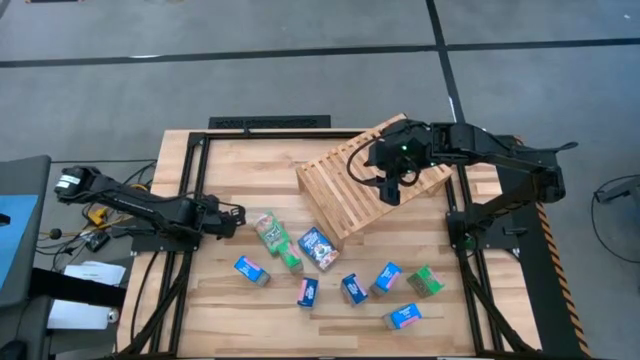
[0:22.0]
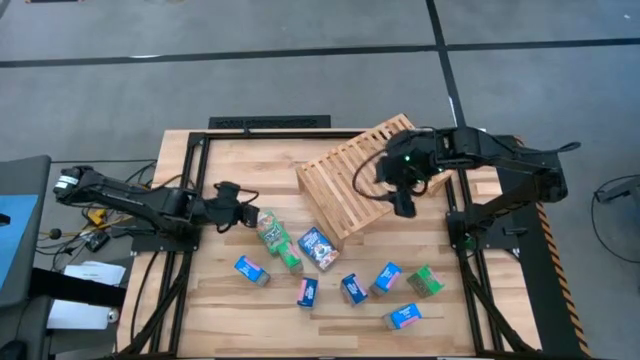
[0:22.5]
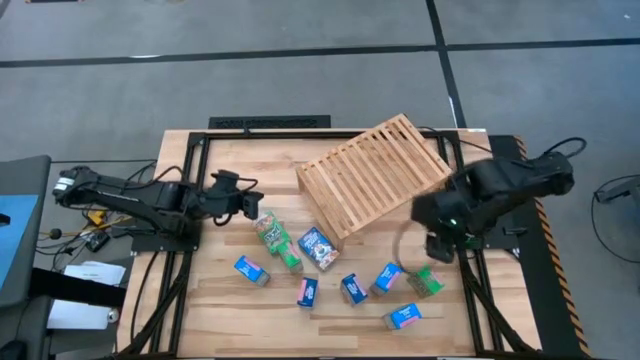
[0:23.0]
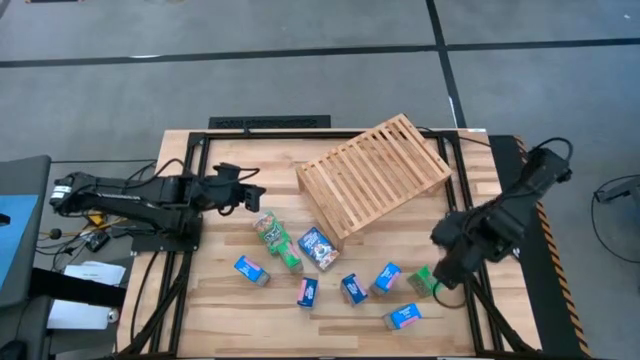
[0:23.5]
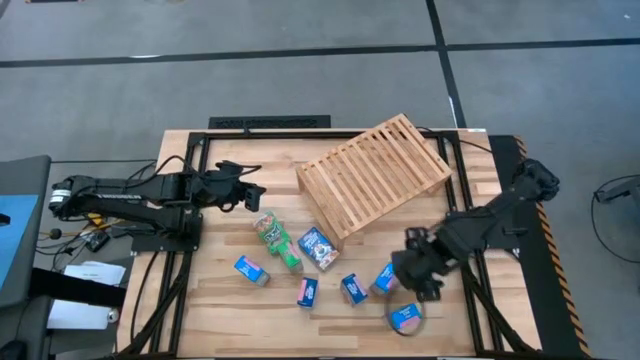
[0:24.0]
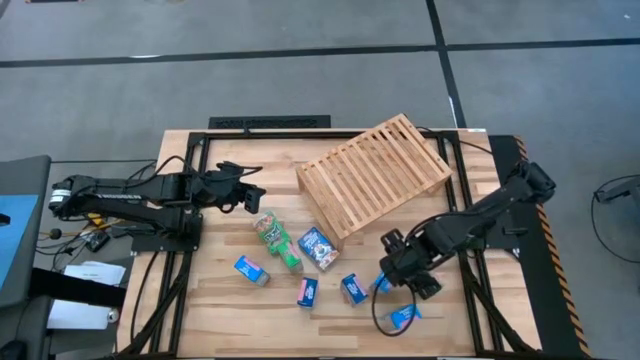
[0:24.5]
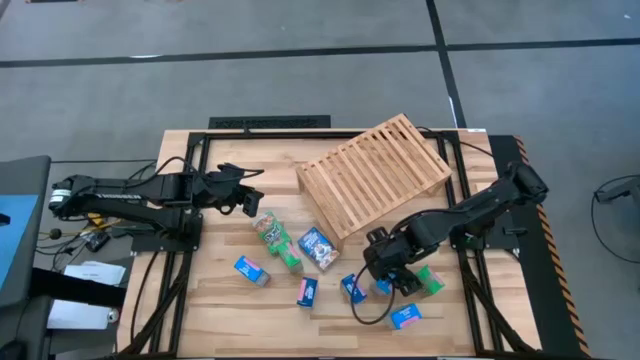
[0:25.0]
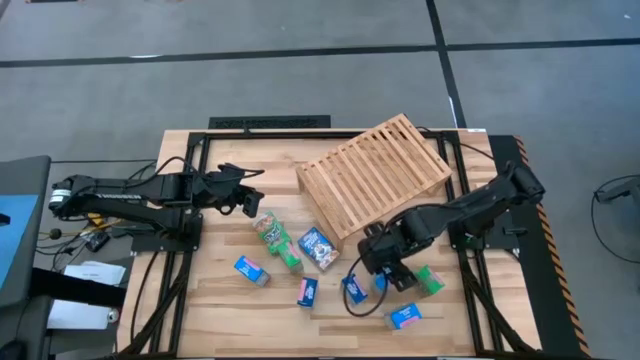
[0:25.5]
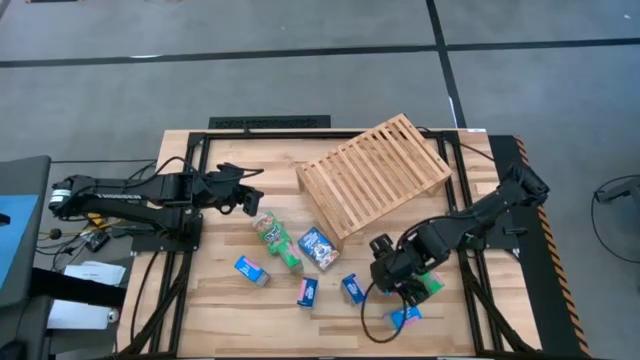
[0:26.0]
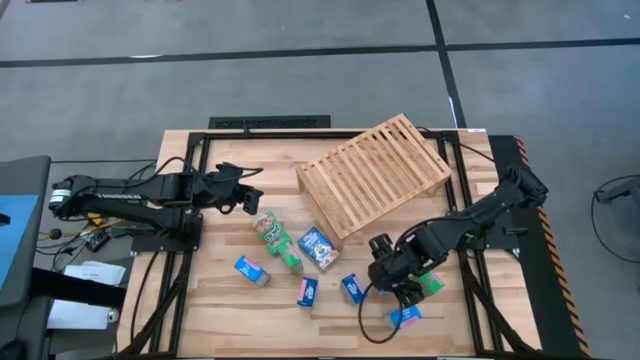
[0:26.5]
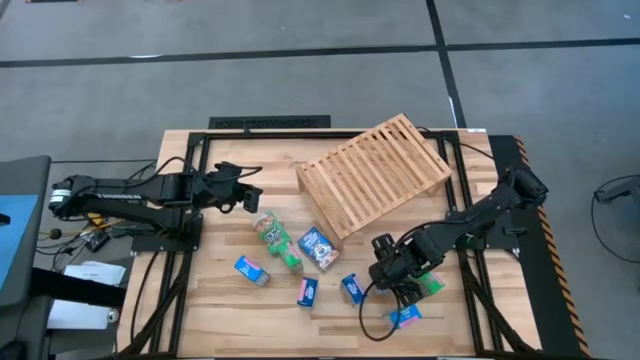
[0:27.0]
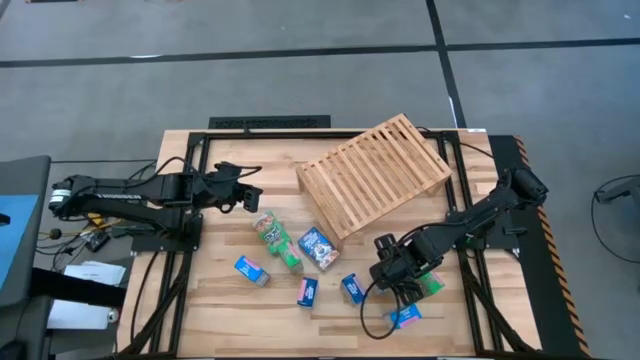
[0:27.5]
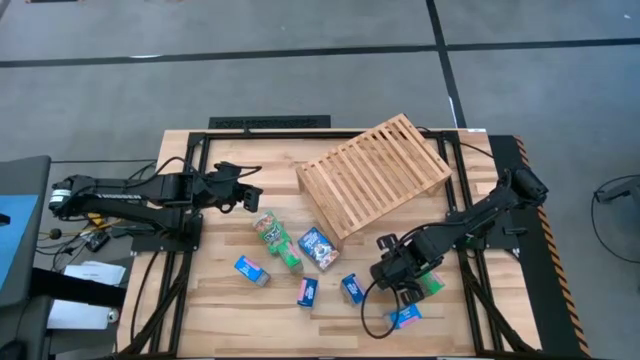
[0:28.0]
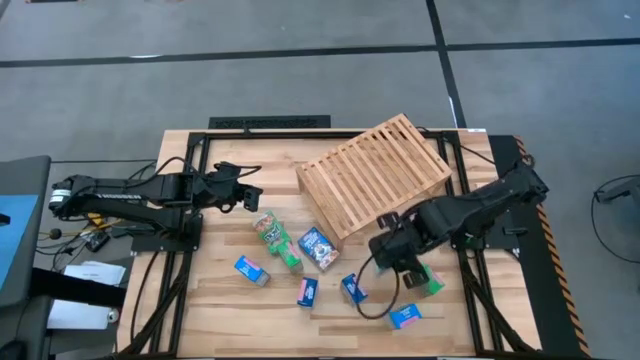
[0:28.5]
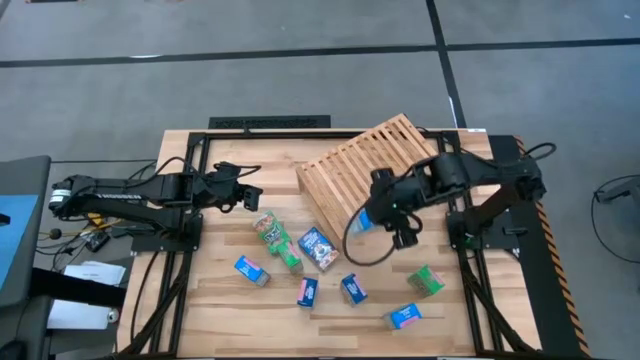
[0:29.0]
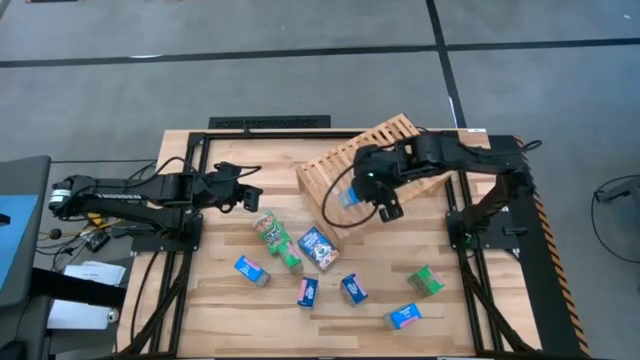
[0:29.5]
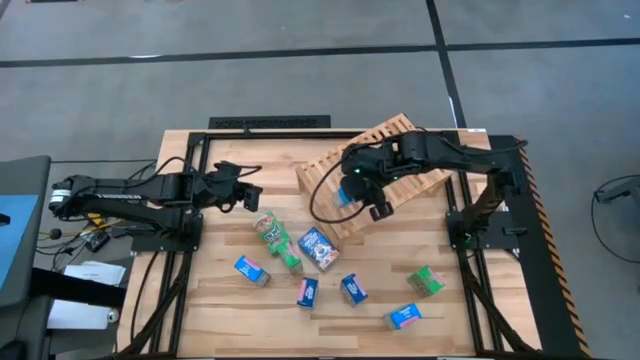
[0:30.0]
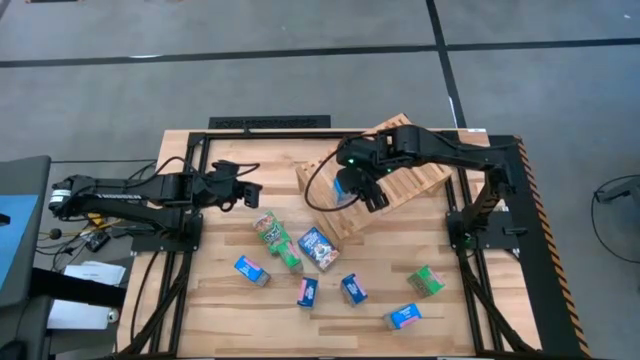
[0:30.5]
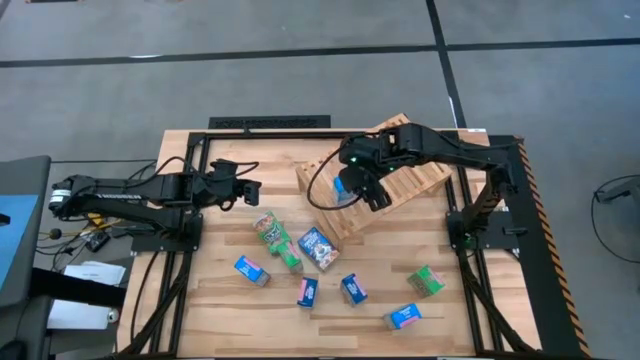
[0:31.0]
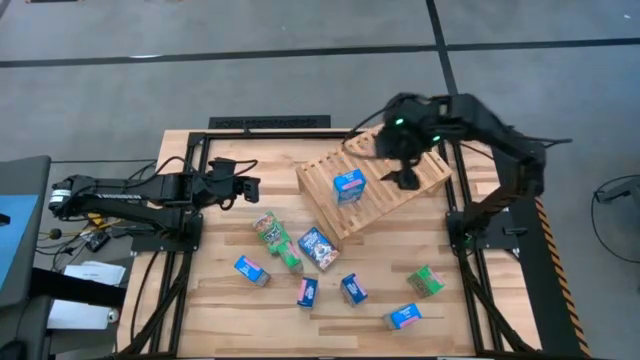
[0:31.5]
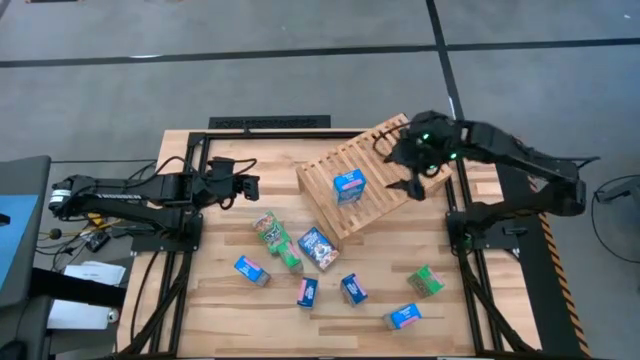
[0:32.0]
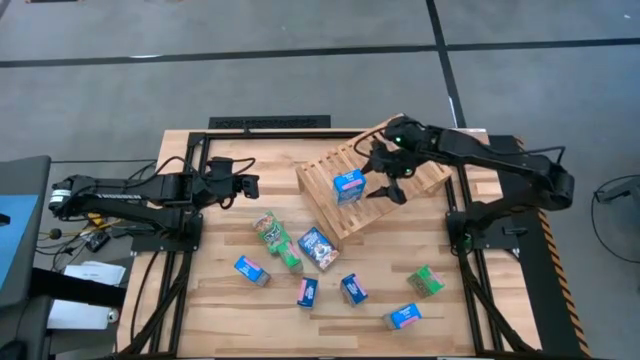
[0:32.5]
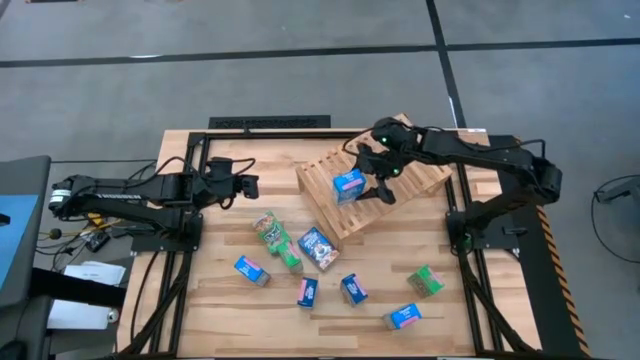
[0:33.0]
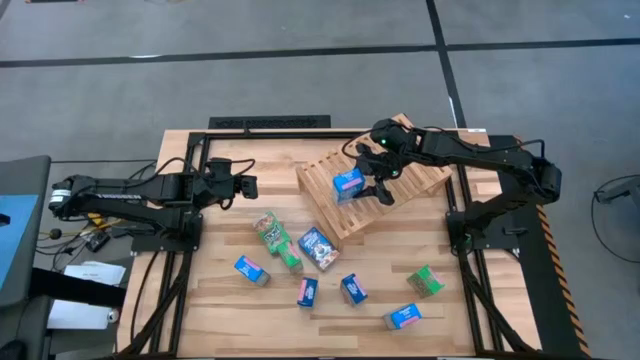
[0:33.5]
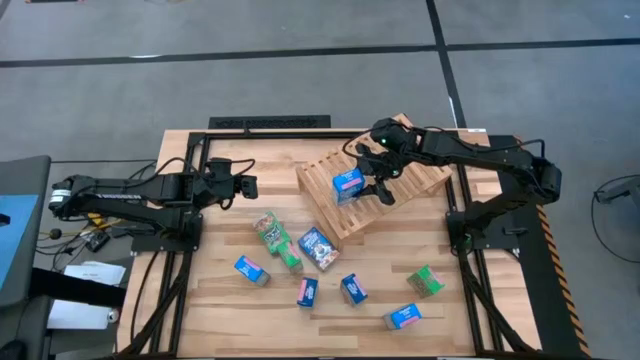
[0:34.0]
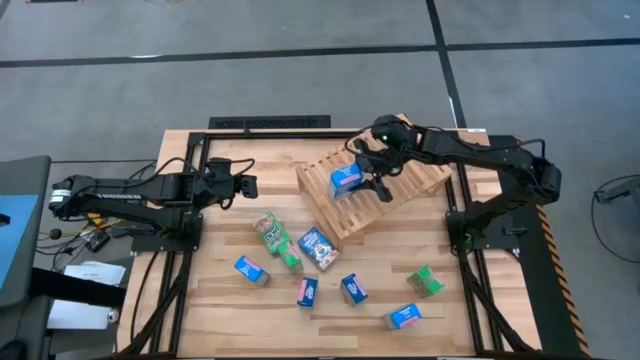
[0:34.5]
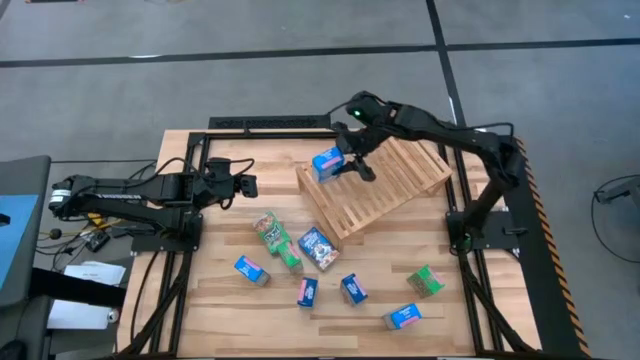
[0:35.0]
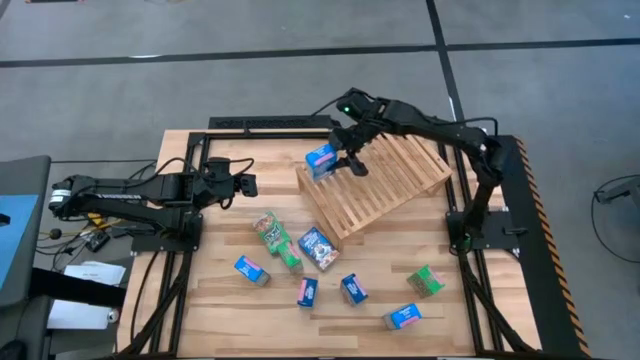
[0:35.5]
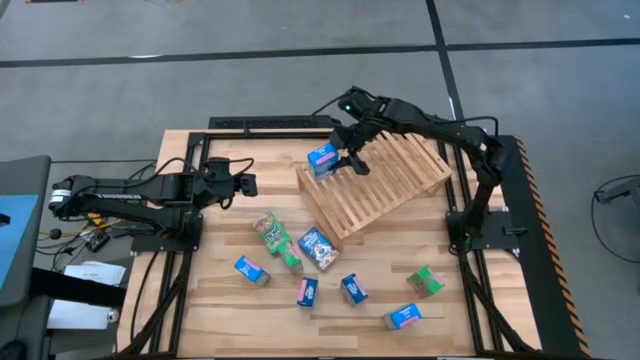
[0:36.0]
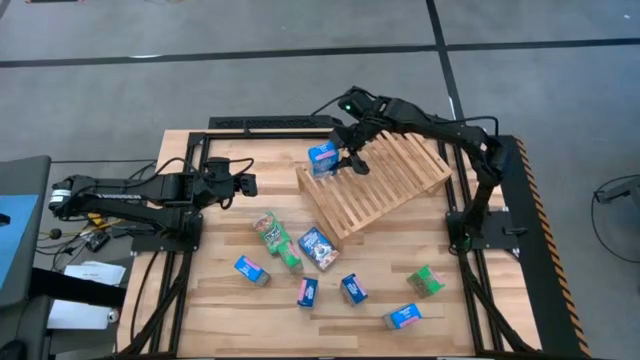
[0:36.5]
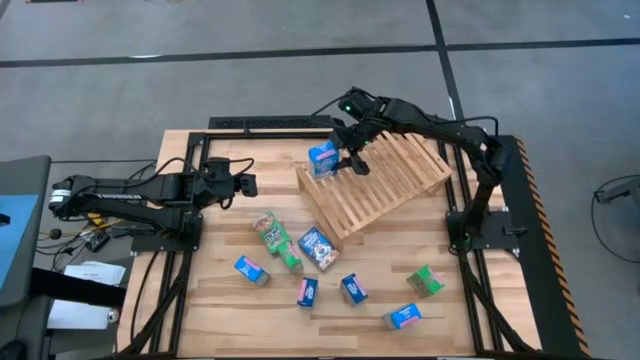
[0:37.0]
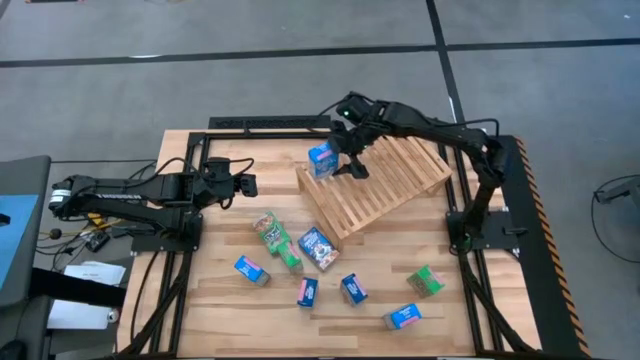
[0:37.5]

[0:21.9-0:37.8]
Task: Stack cereal on shelf
Put the top right light blue cereal box on the shelf
